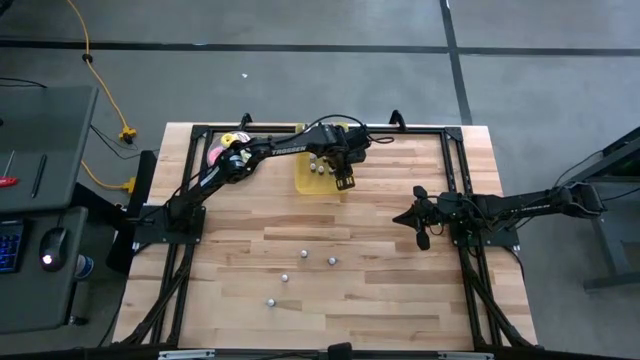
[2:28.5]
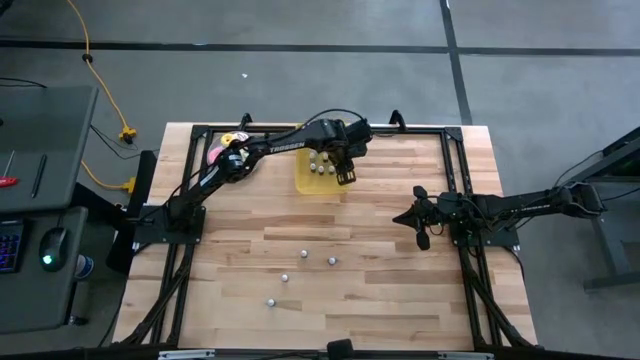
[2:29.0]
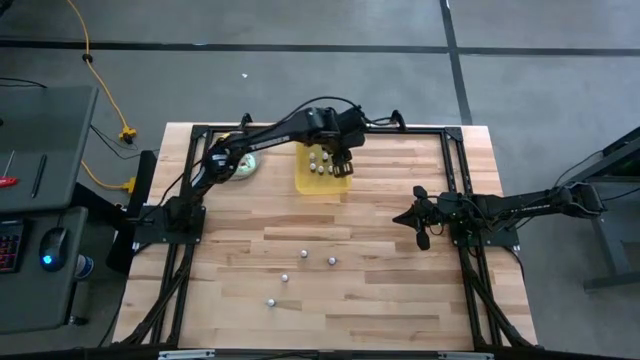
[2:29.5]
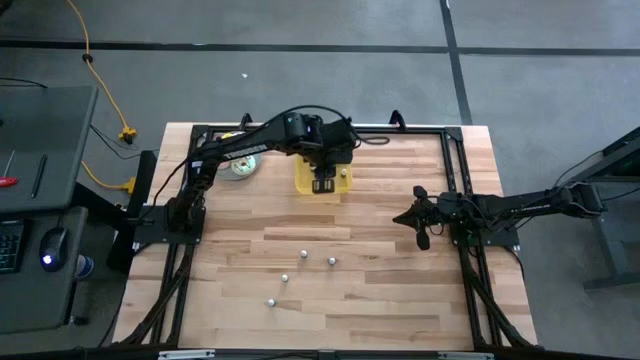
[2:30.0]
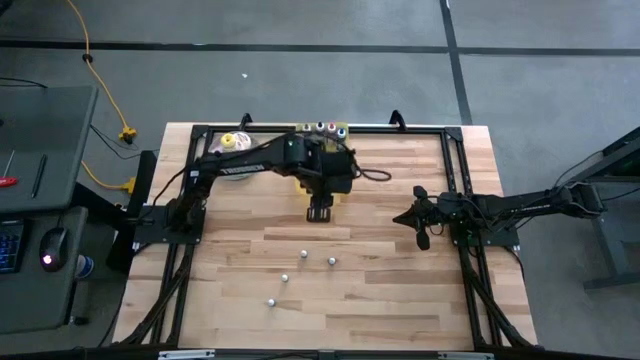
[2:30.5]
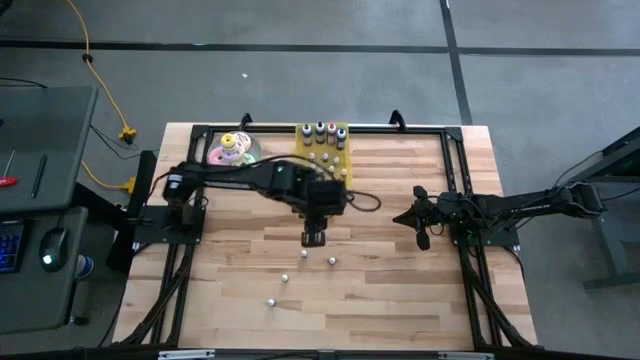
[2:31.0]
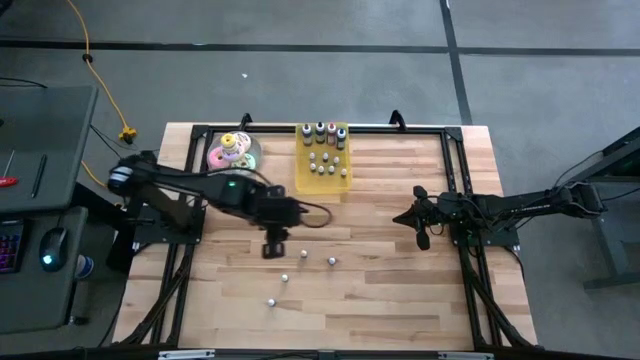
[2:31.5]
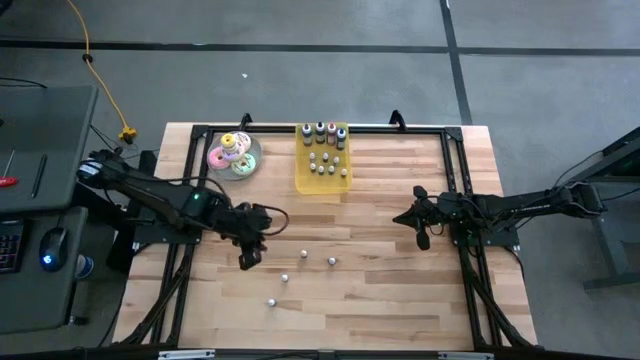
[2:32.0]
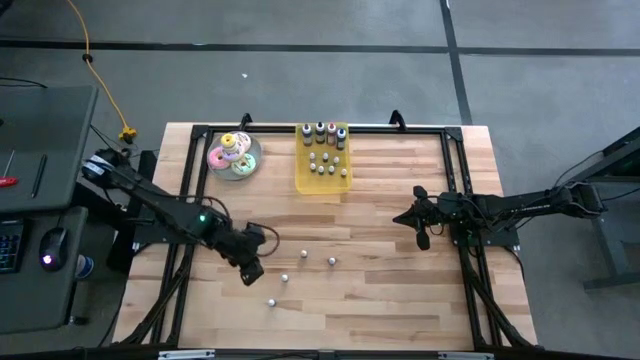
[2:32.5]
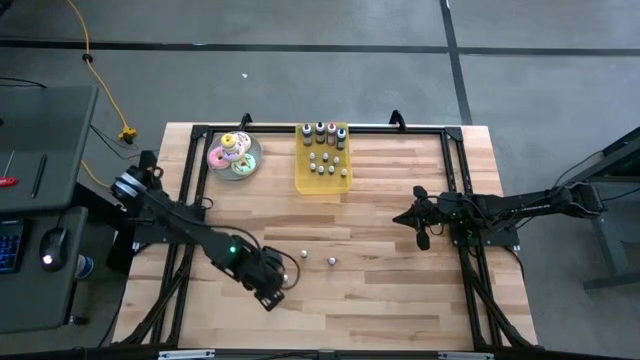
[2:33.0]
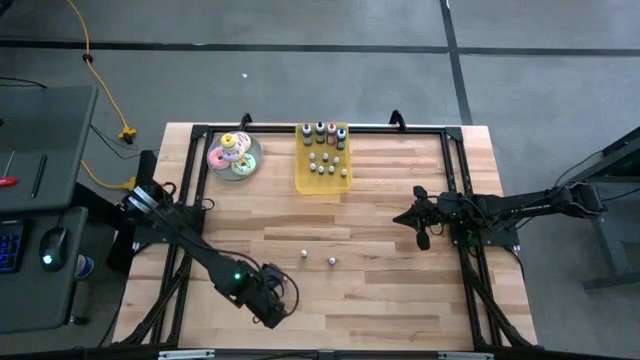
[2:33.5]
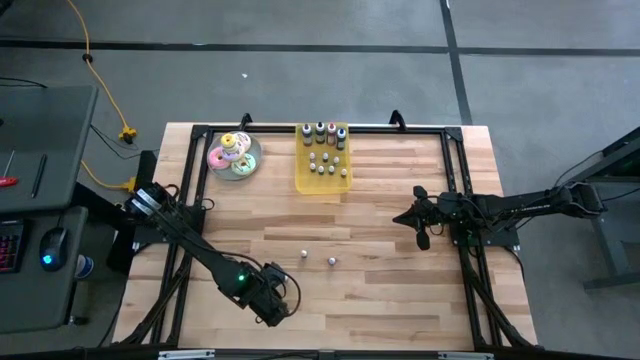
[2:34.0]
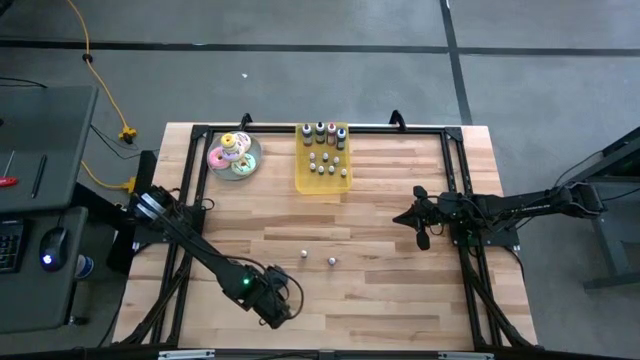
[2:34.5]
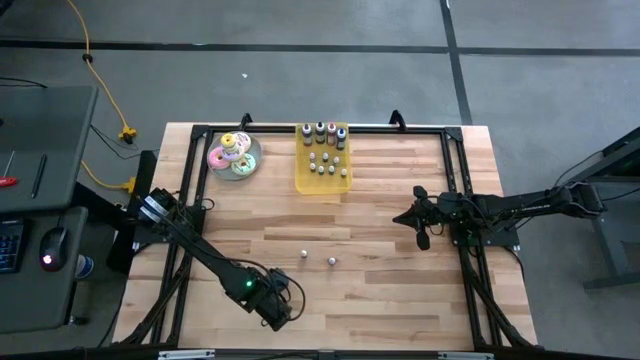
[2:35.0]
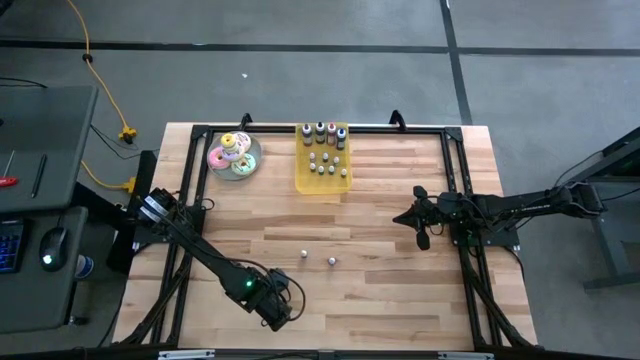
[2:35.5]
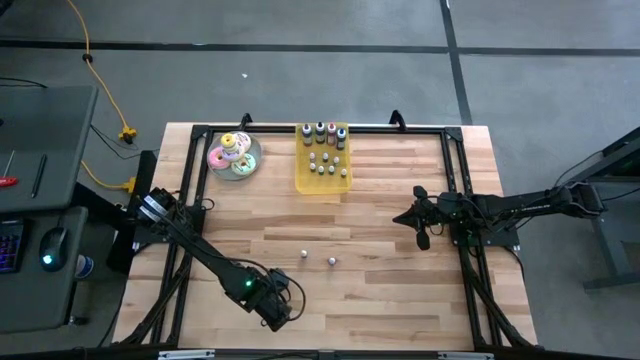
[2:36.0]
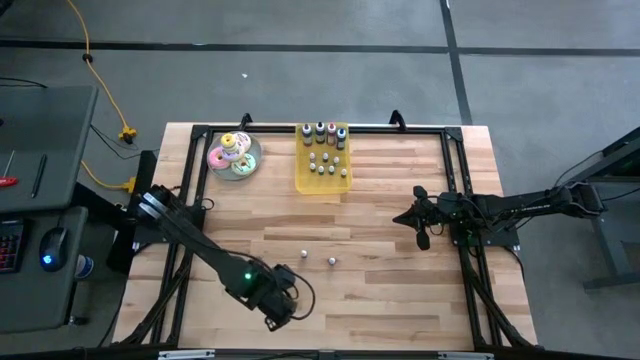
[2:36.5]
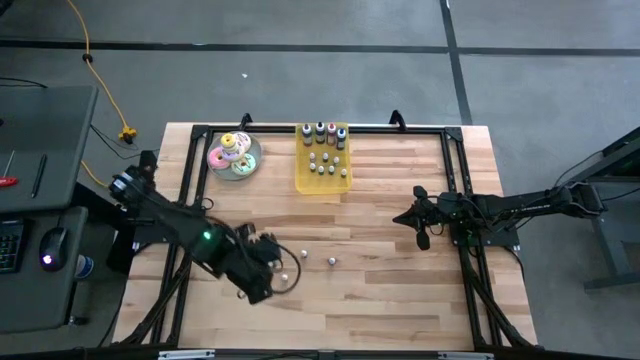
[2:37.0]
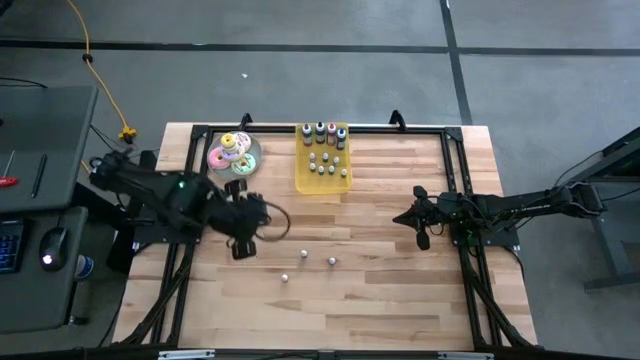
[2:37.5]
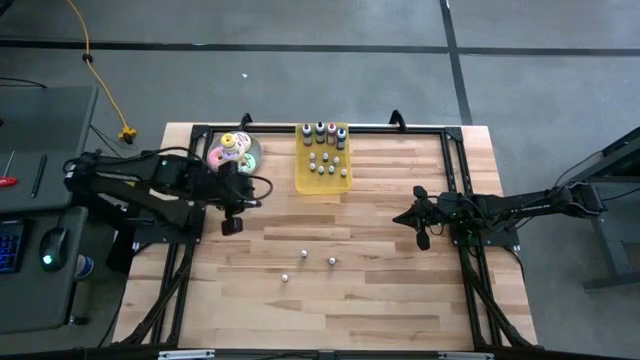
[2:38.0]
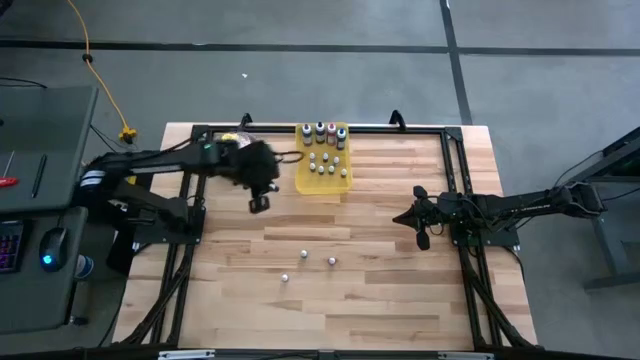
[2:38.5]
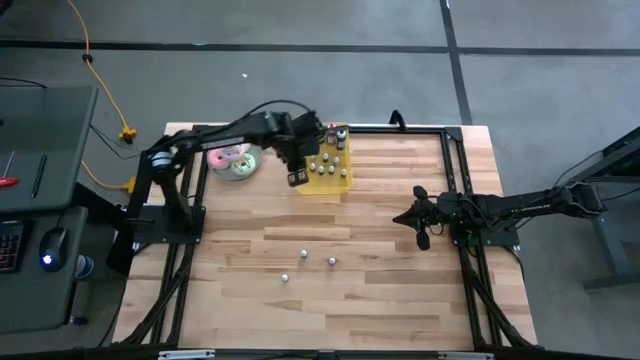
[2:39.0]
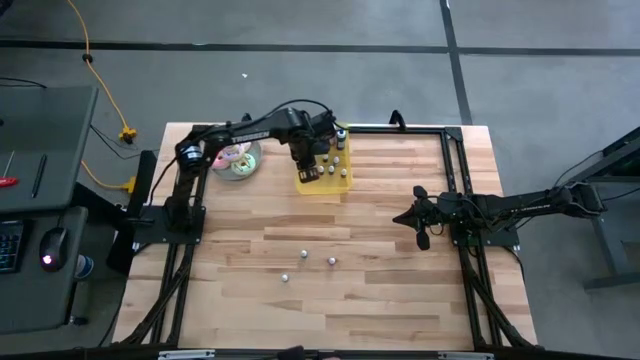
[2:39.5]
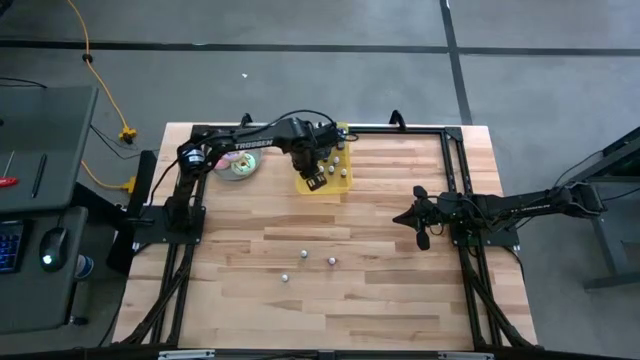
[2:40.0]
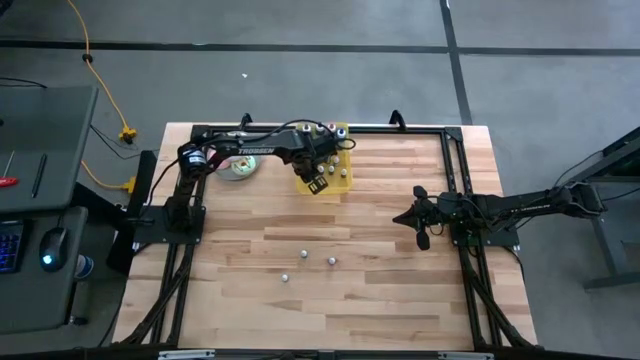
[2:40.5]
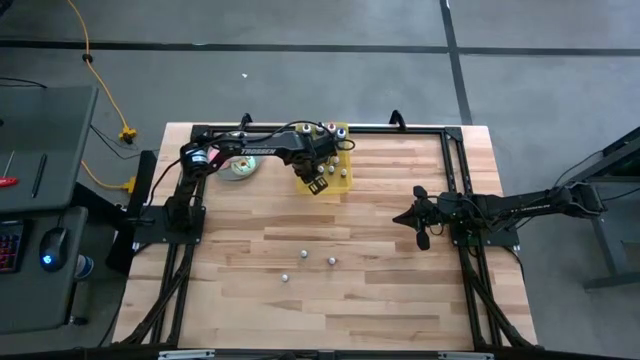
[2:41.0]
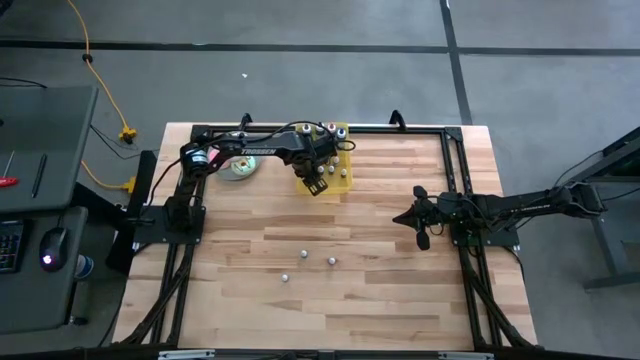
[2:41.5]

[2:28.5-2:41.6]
Task: Pick & Place food coloring
Put the small purple food coloring bottle into the yellow bin

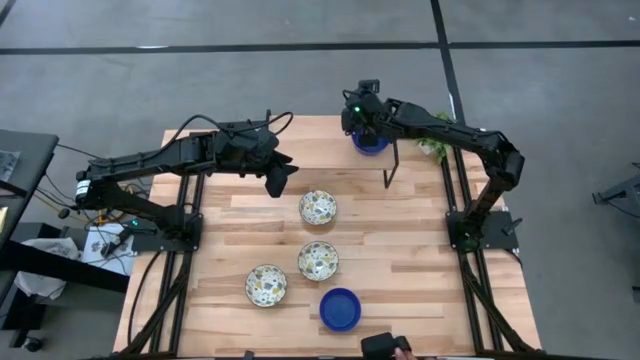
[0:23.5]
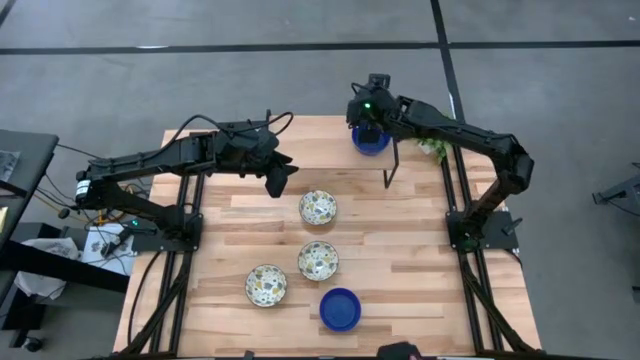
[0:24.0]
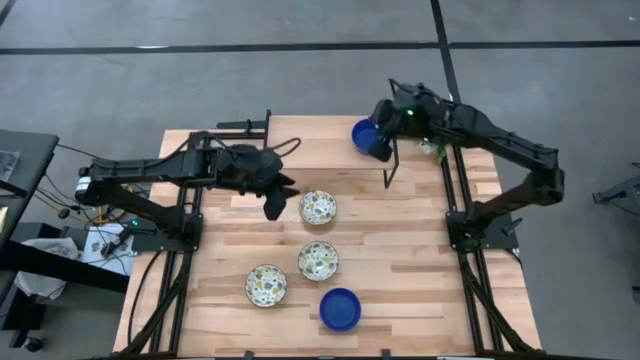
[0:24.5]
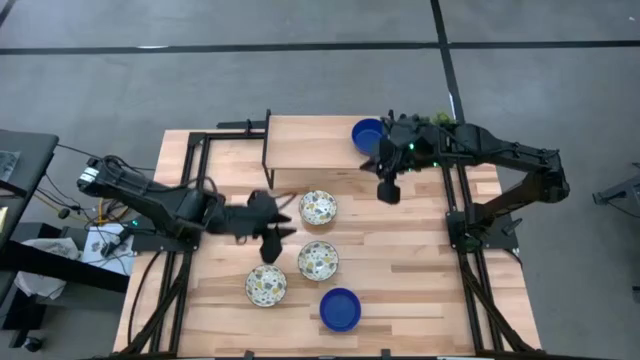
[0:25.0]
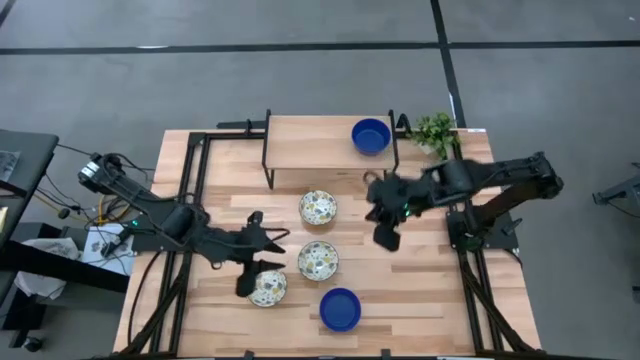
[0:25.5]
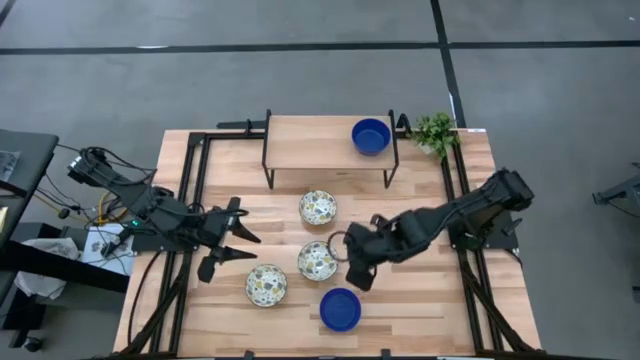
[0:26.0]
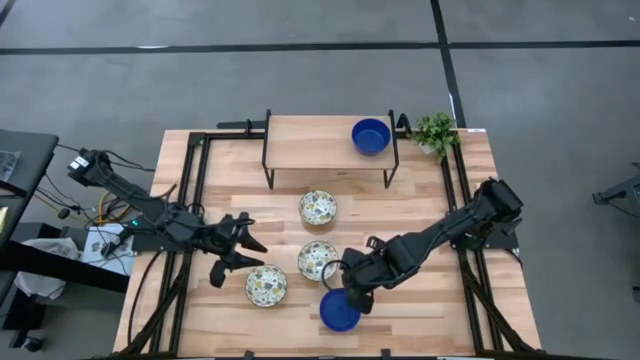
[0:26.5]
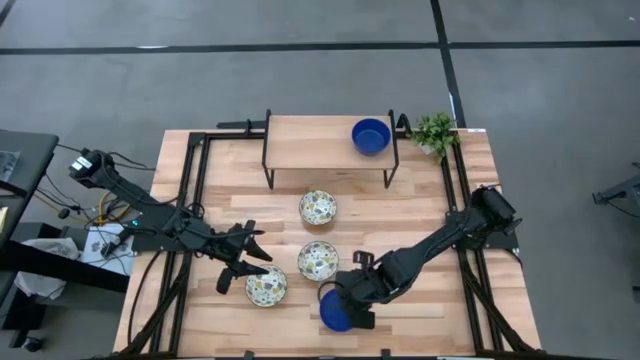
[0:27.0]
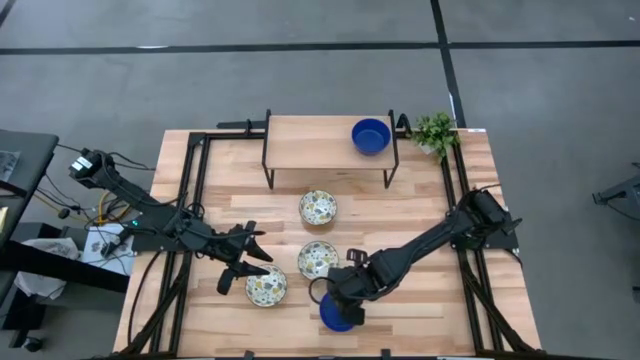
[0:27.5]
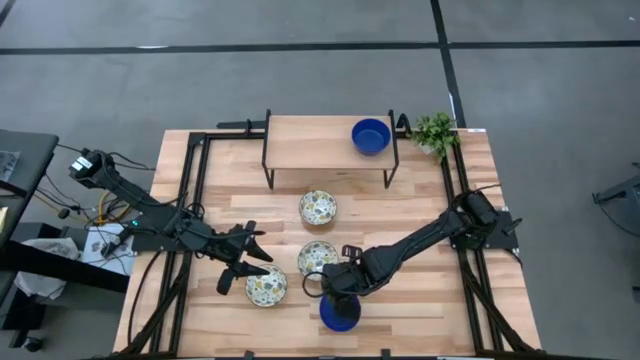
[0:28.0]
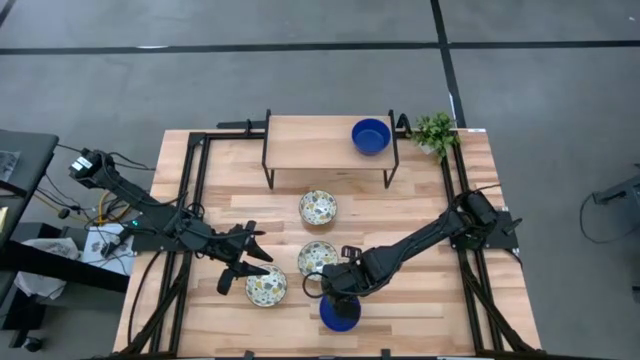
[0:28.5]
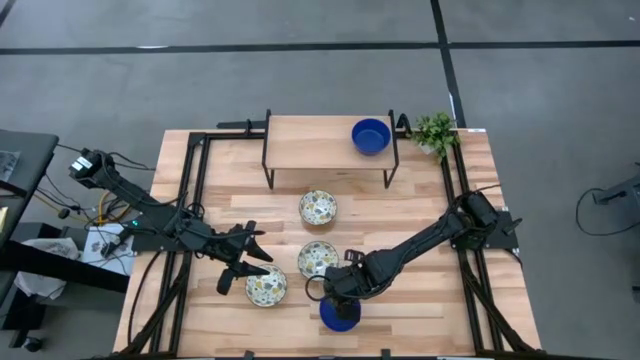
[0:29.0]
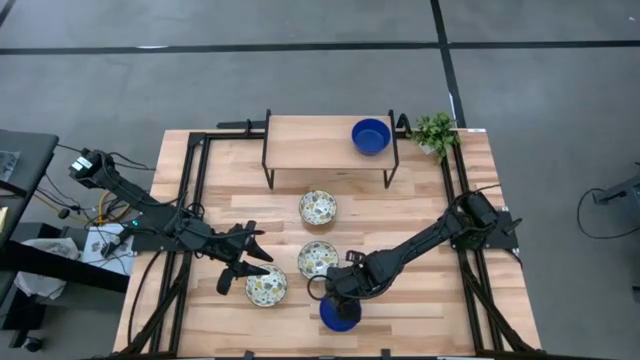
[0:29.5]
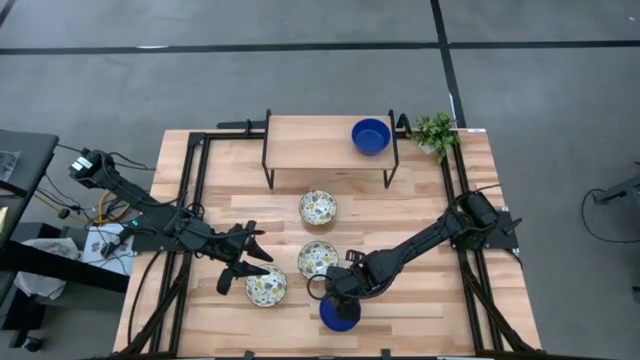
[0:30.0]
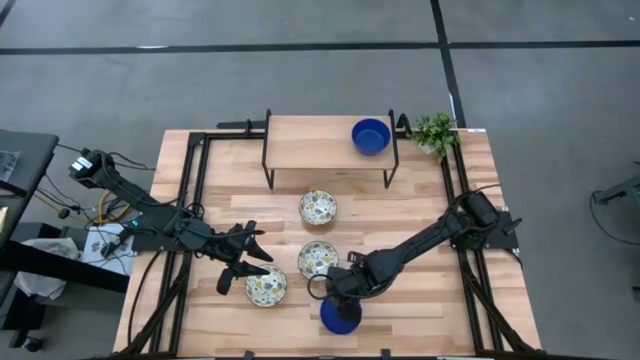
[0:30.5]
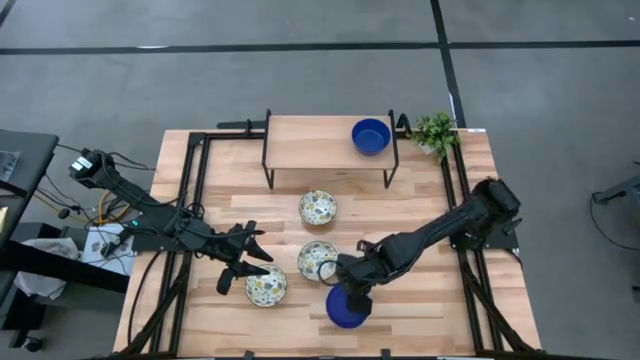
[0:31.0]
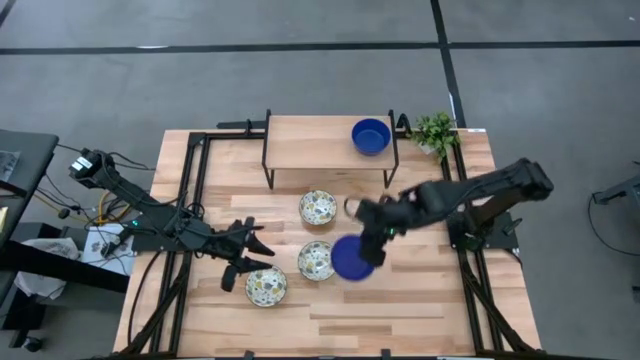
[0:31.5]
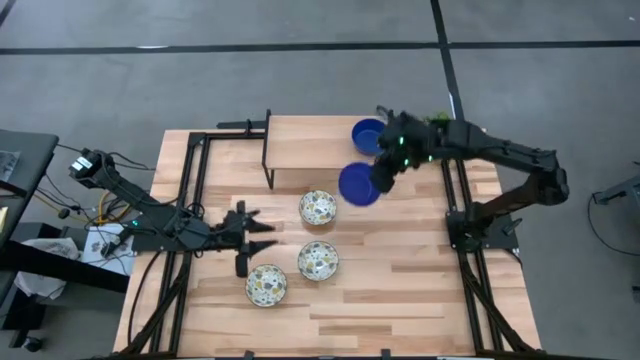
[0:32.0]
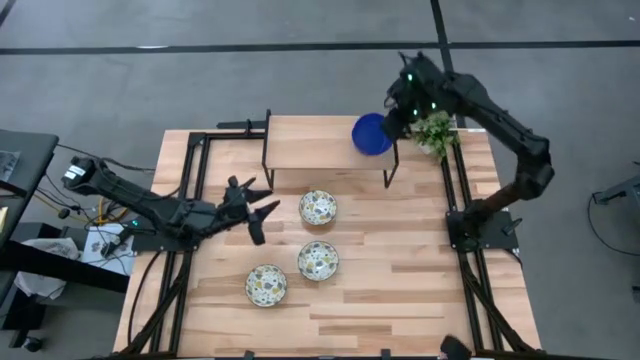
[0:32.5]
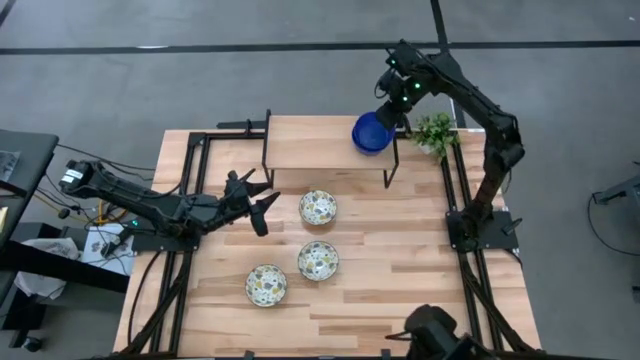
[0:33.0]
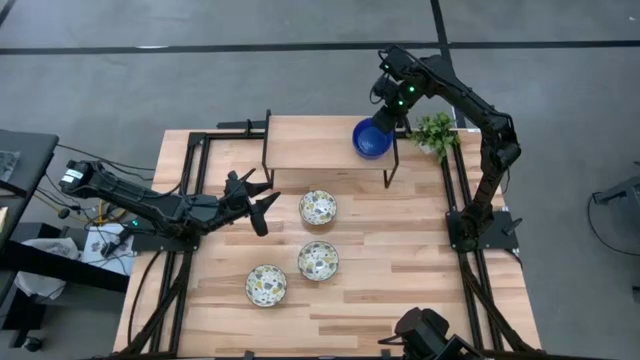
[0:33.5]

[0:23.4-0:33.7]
Task: Pick & Place Mini bowls
Stack the blue bowl on the stacked blue bowls on the shelf
